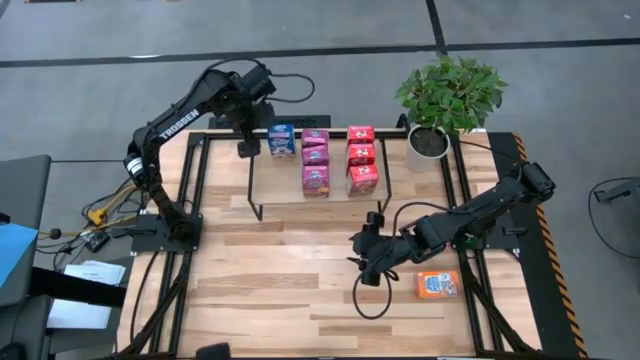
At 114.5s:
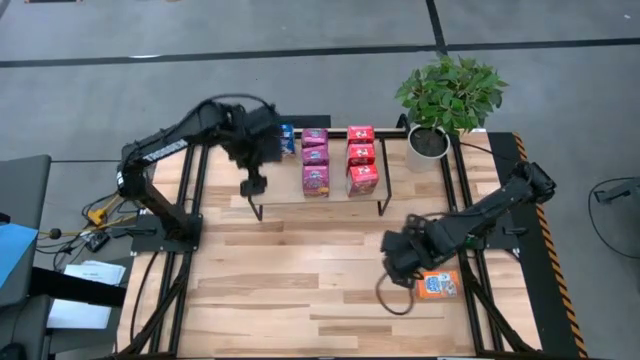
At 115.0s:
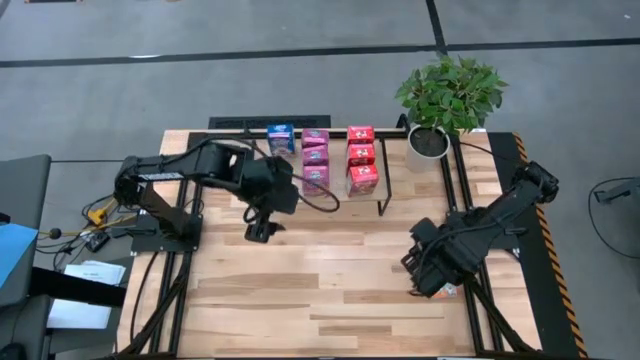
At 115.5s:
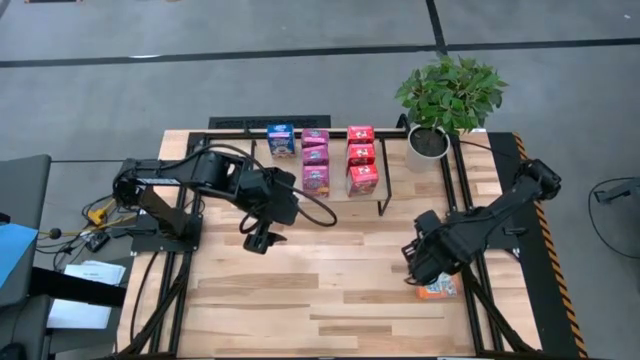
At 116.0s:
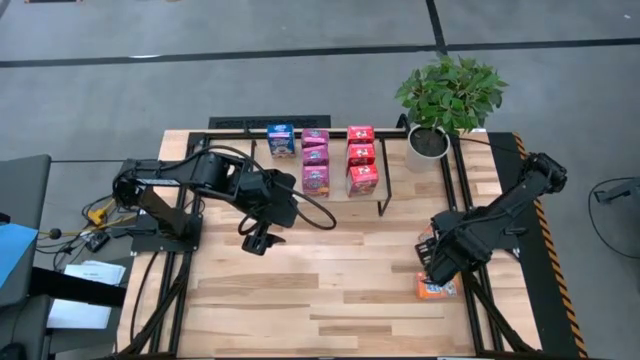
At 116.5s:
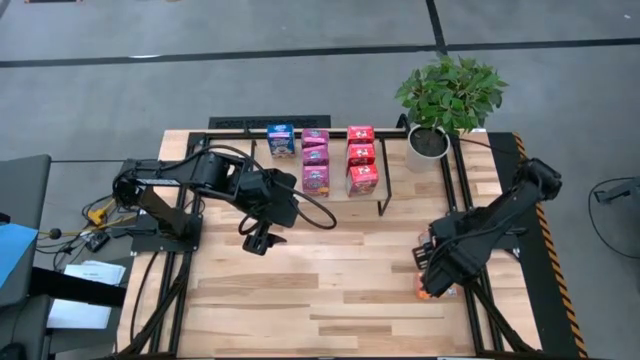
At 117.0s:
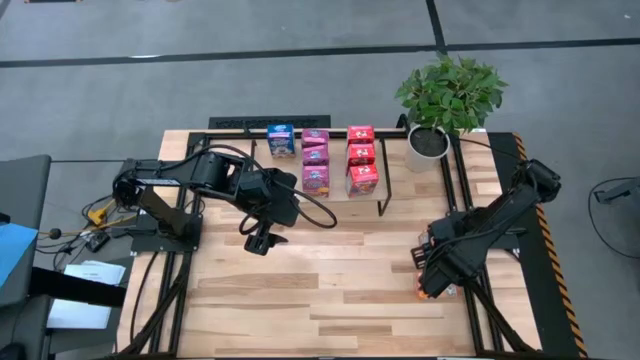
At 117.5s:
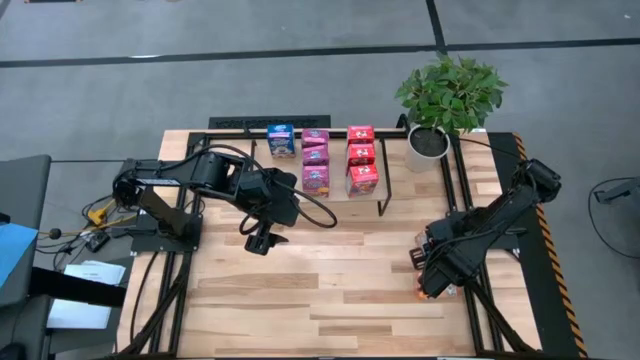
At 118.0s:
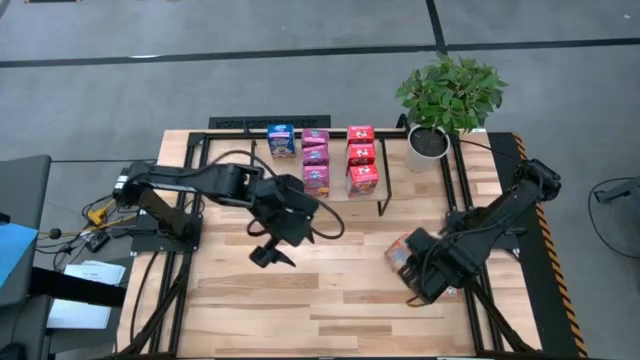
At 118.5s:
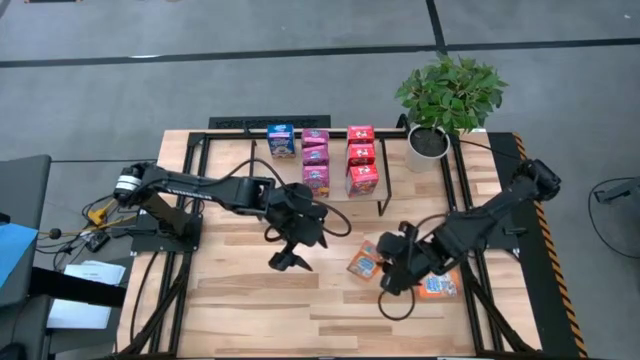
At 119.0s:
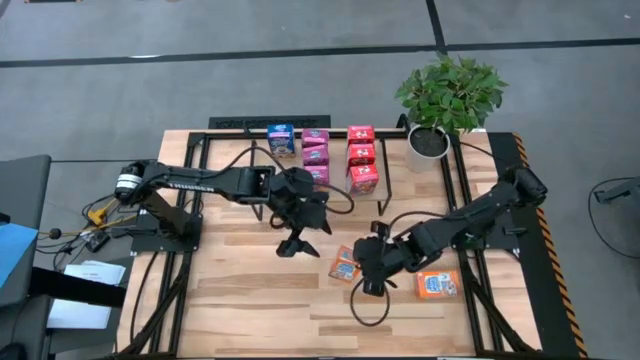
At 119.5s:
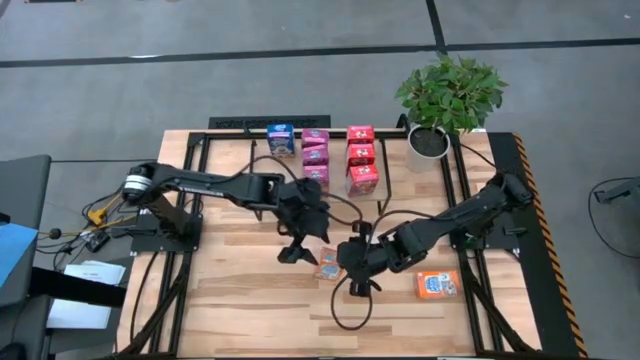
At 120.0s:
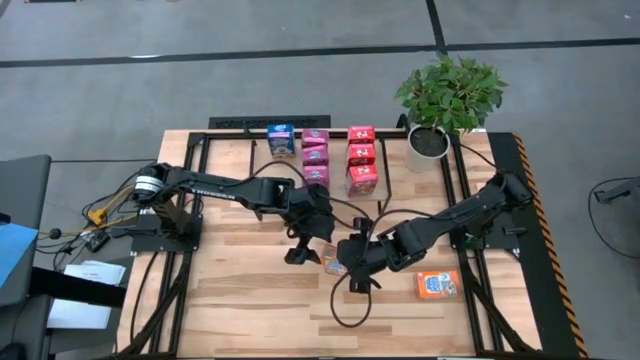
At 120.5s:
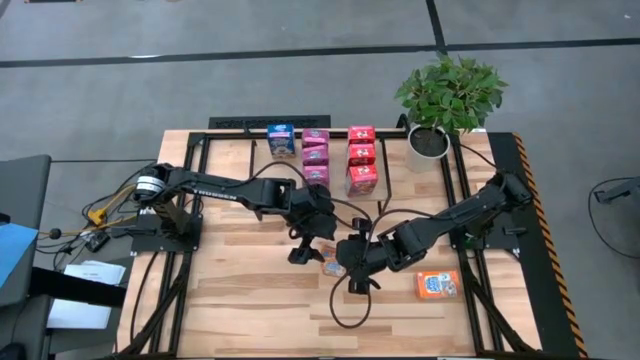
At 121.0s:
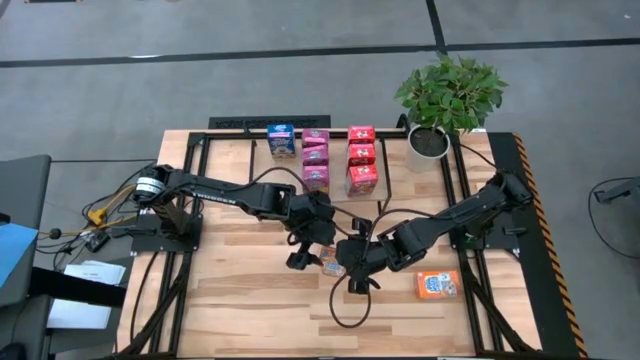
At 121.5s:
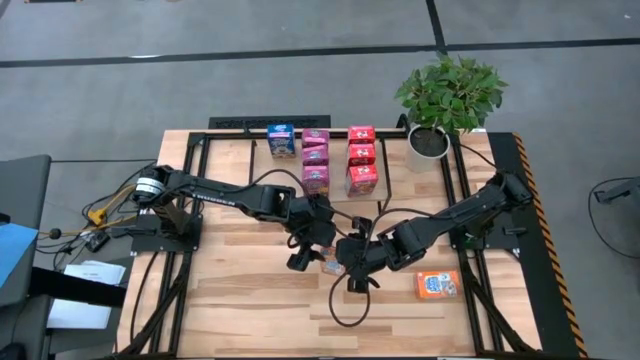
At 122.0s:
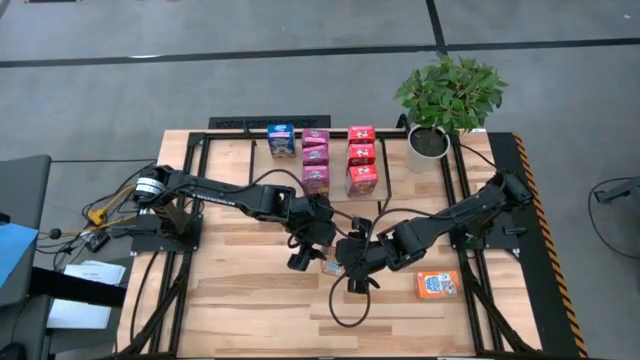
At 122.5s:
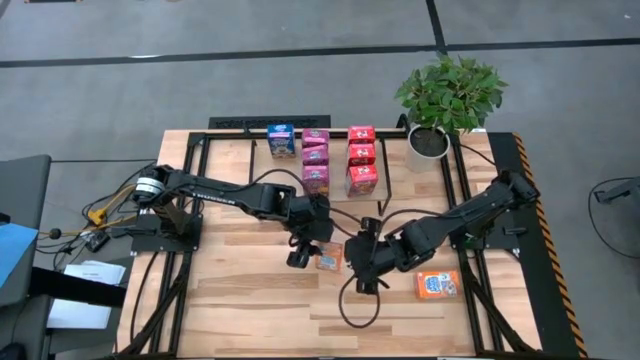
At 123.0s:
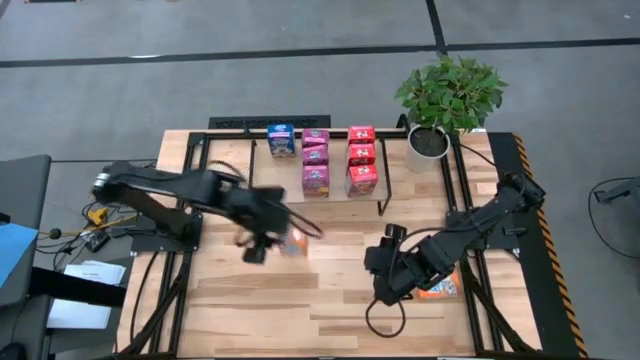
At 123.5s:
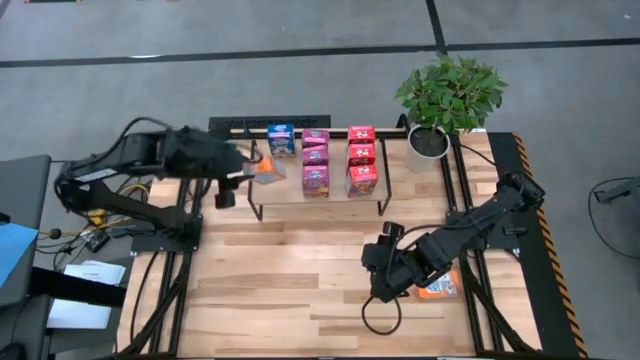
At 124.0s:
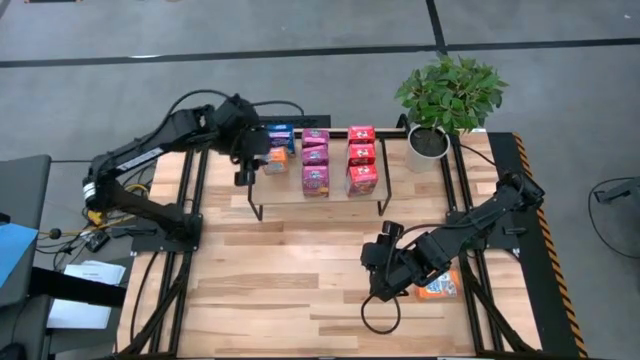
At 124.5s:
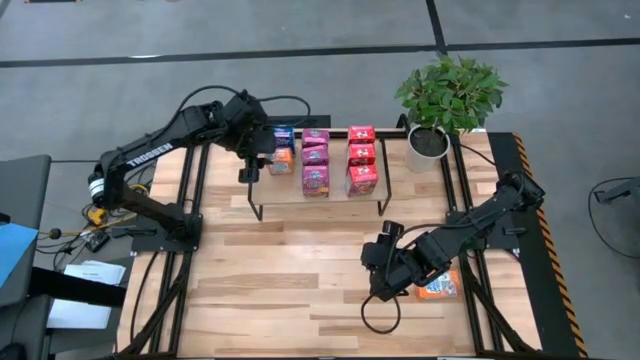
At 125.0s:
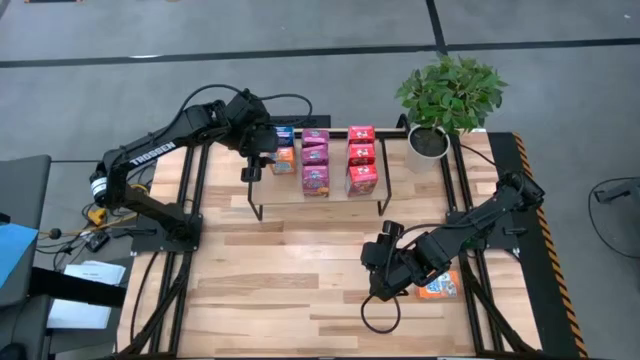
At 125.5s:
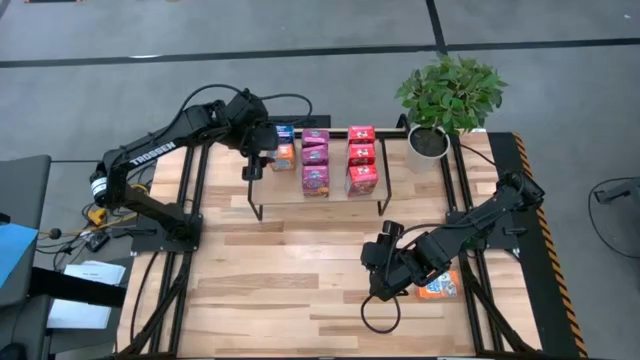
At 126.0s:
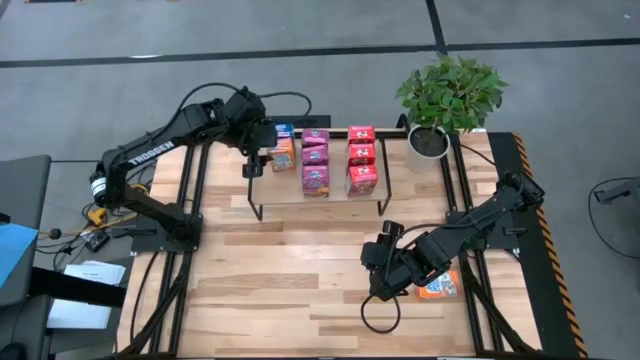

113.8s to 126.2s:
Task: Stack cereal on shelf
Put the top orange cereal box on the shelf

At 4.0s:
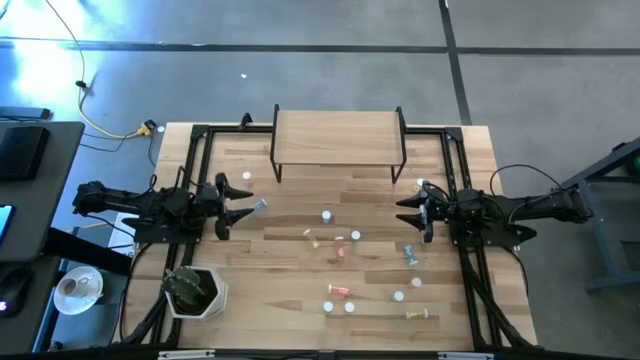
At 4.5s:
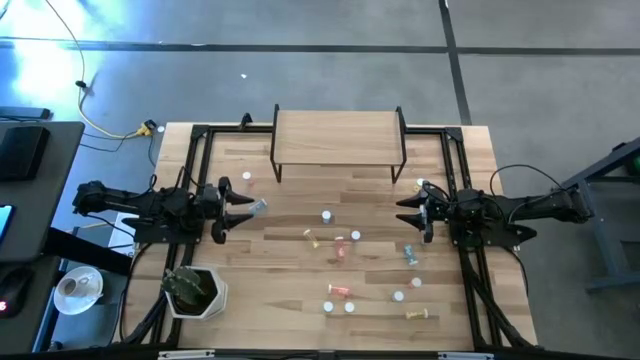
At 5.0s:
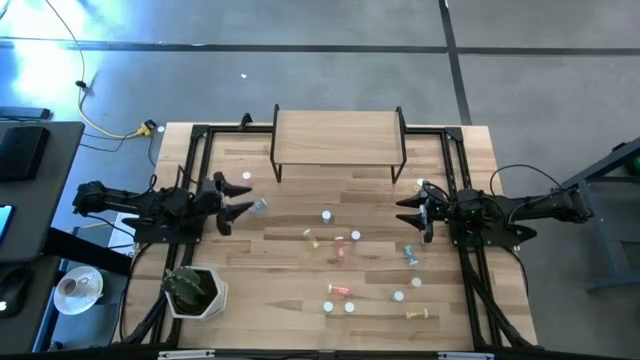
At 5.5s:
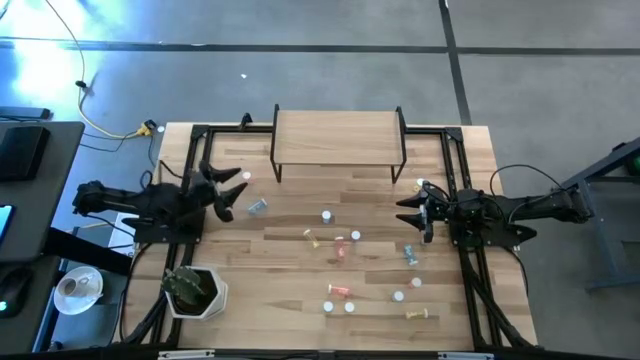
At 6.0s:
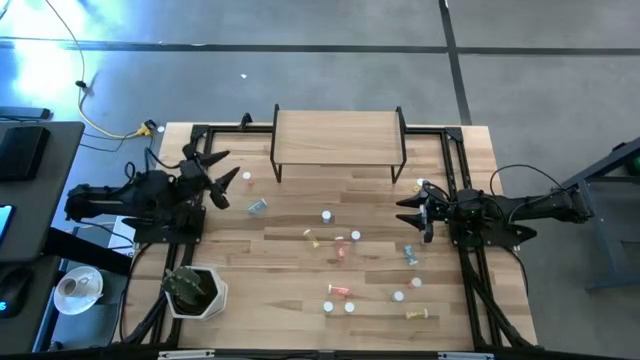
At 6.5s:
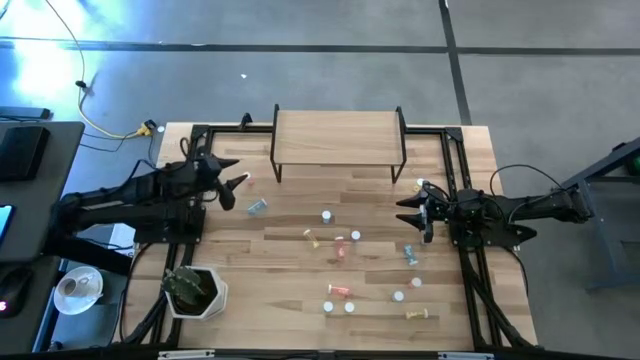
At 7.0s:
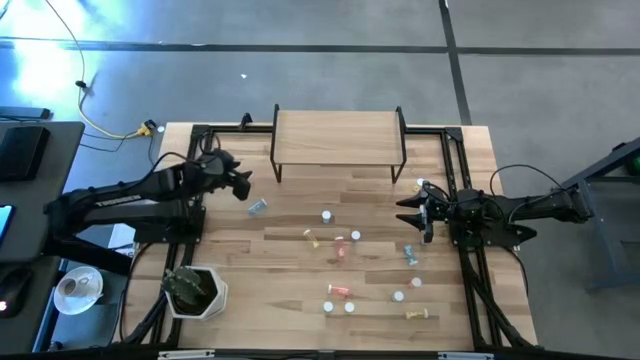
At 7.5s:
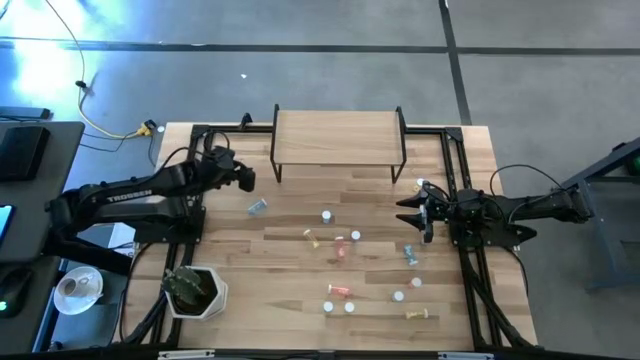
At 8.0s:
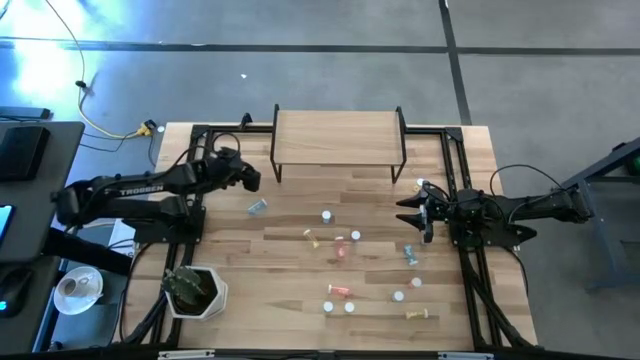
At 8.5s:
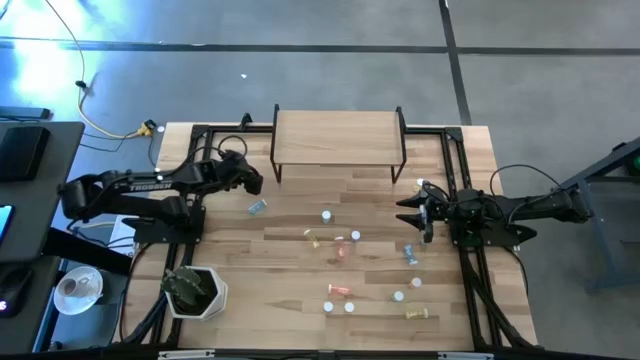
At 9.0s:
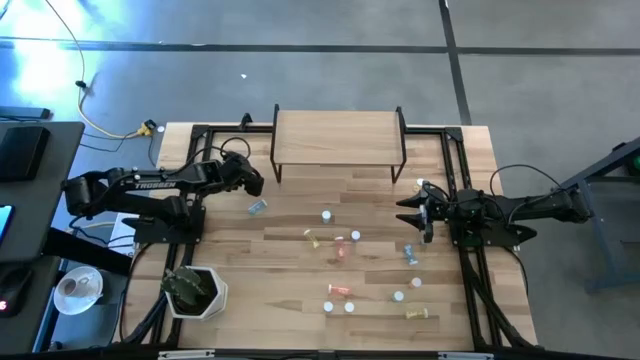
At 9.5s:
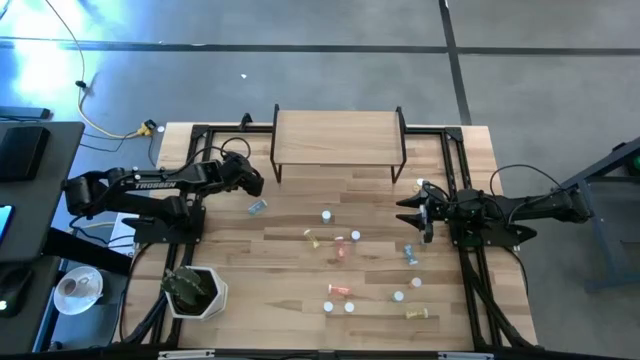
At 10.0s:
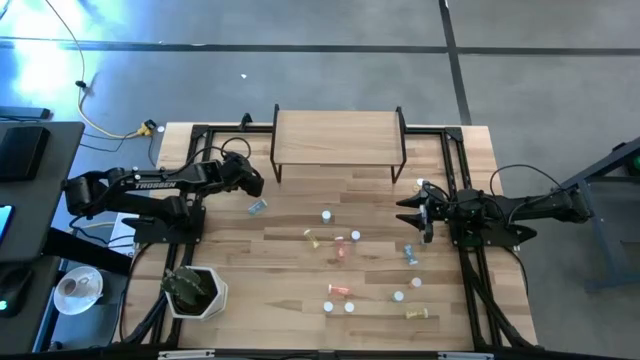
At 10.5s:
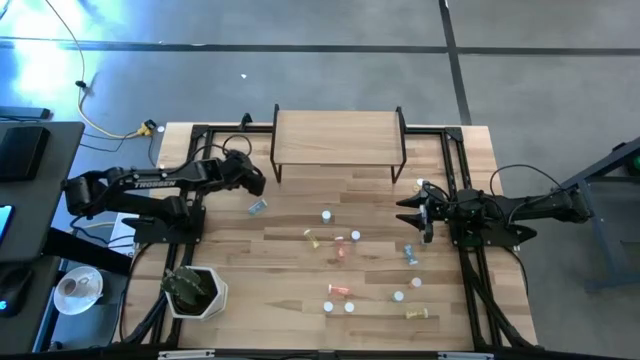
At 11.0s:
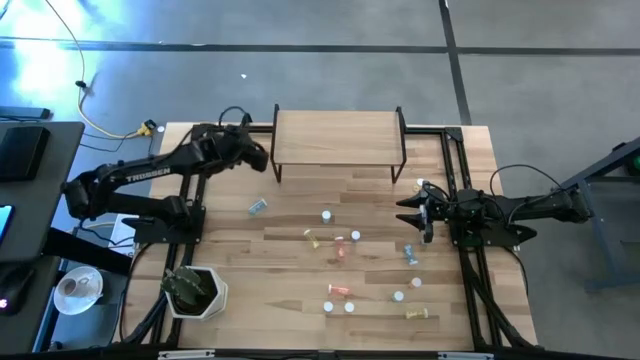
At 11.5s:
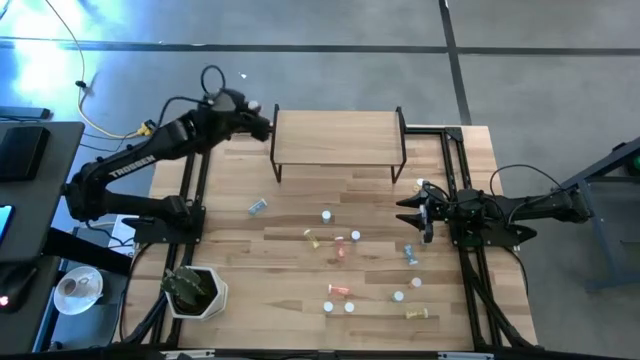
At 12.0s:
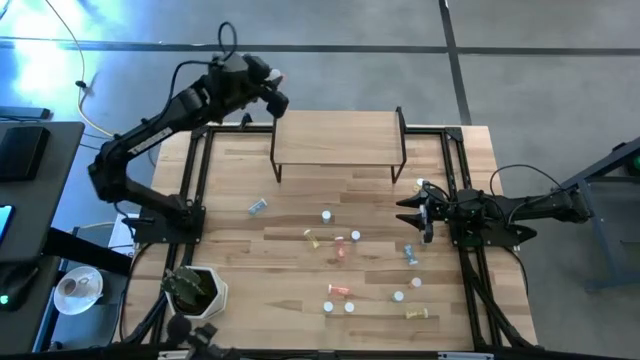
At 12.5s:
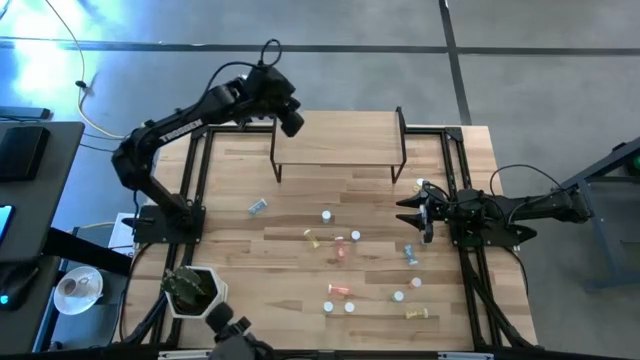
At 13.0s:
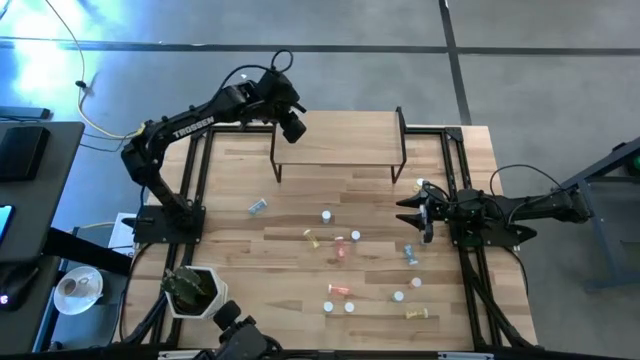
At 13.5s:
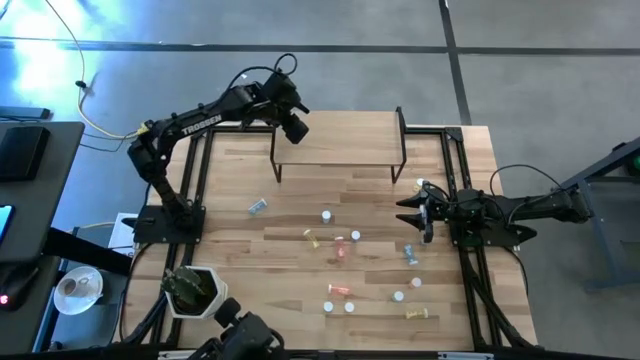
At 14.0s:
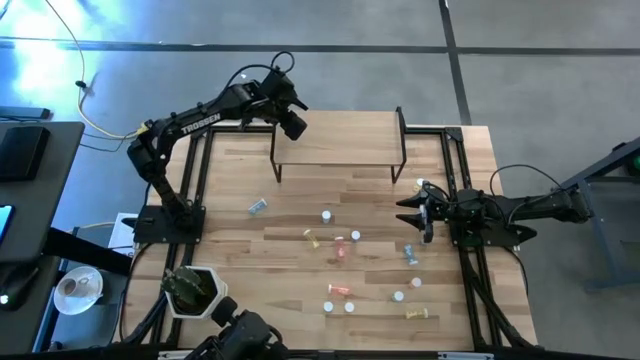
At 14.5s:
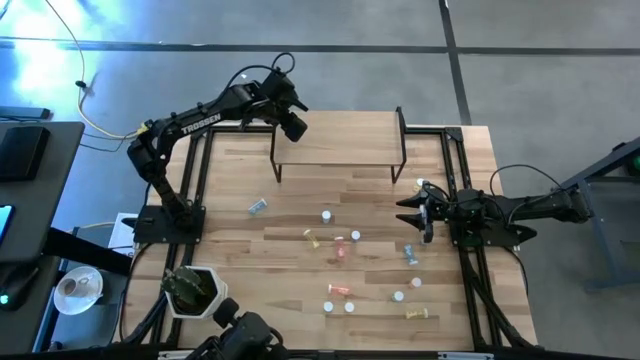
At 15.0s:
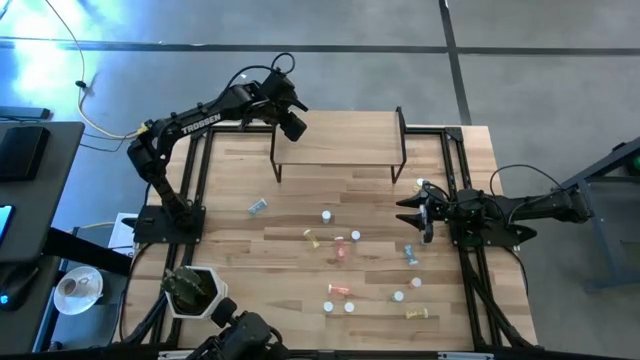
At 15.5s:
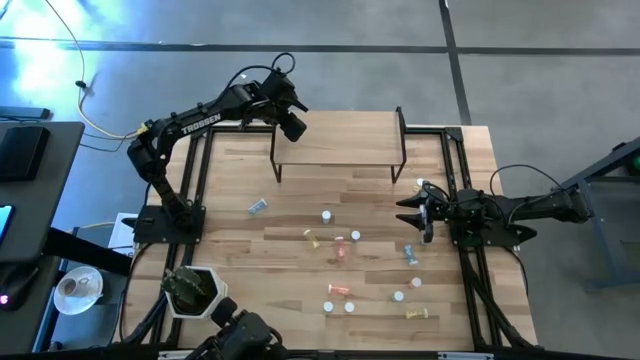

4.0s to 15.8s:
Task: Pick and place medicine bottles onto shelf by color
Put the pink pill bottle on the shelf
